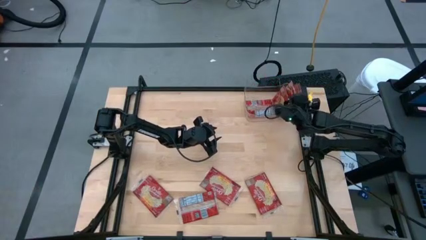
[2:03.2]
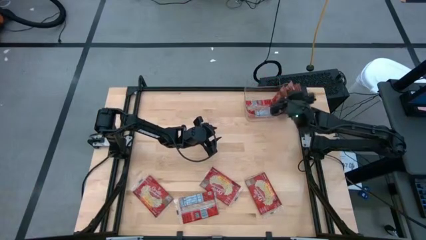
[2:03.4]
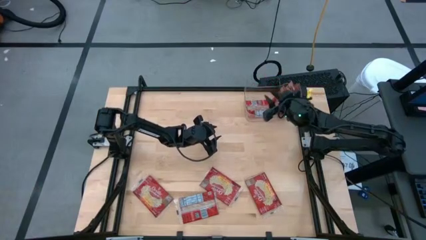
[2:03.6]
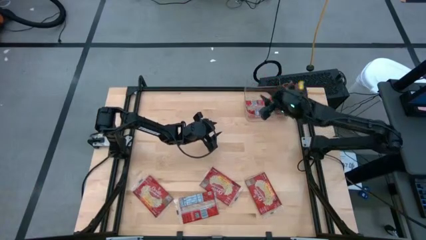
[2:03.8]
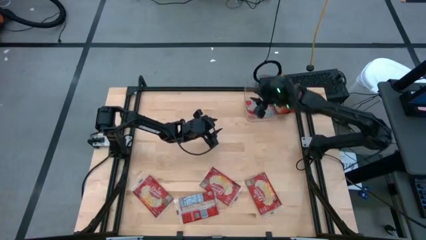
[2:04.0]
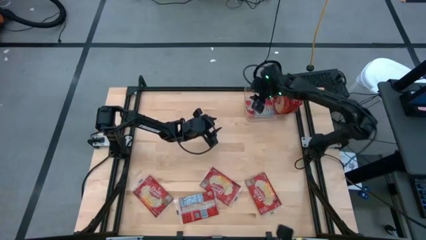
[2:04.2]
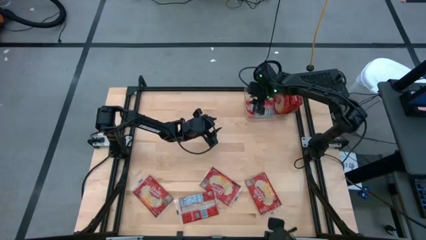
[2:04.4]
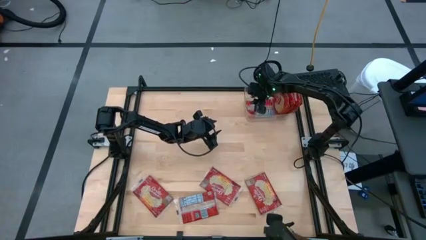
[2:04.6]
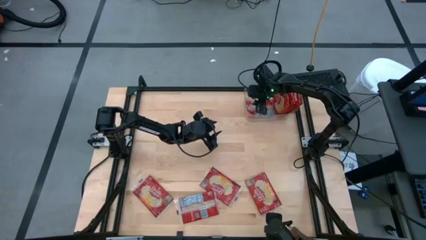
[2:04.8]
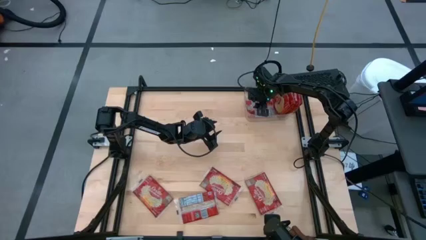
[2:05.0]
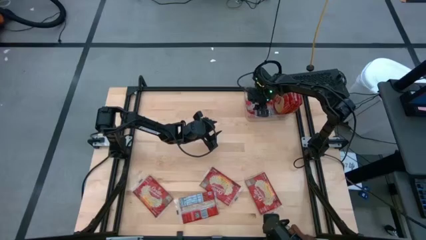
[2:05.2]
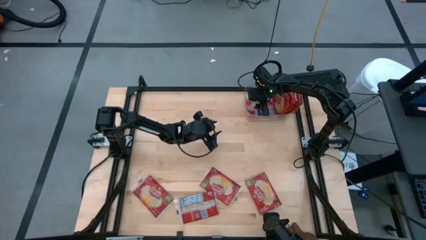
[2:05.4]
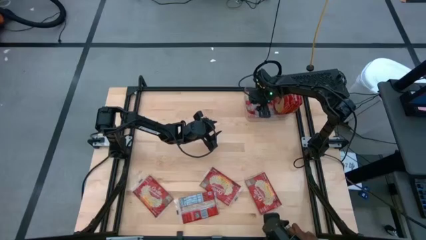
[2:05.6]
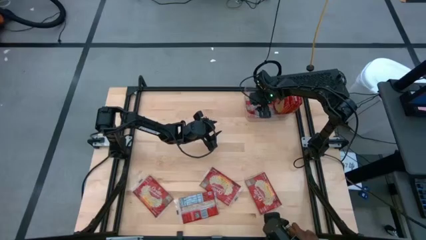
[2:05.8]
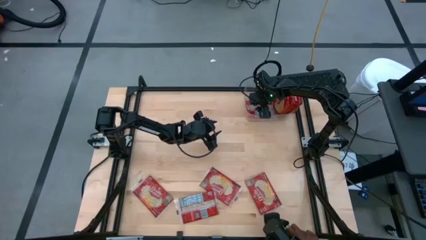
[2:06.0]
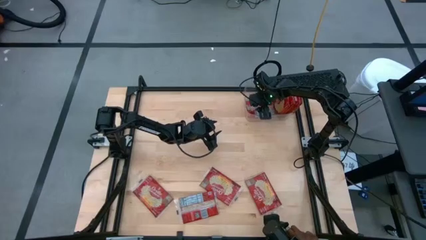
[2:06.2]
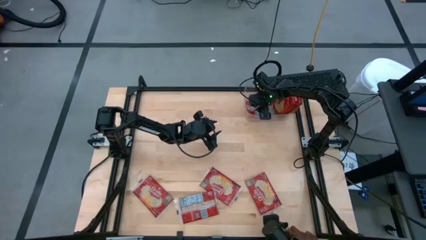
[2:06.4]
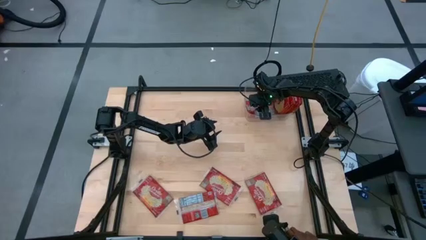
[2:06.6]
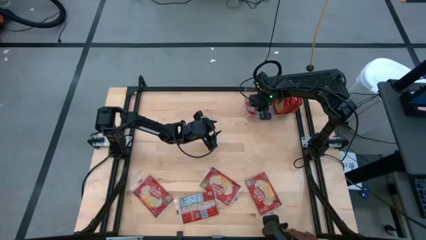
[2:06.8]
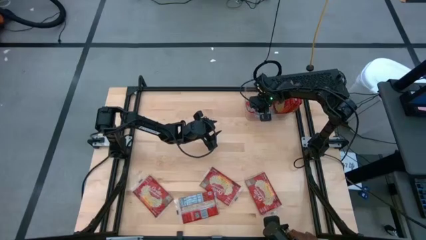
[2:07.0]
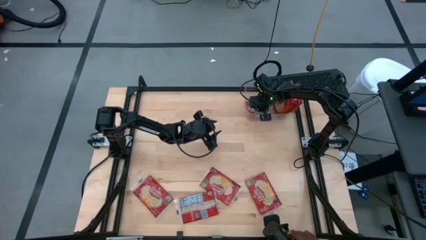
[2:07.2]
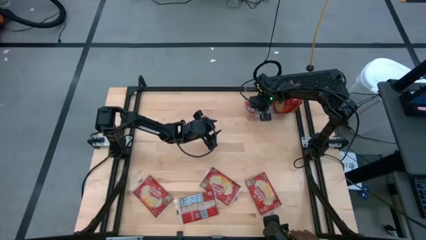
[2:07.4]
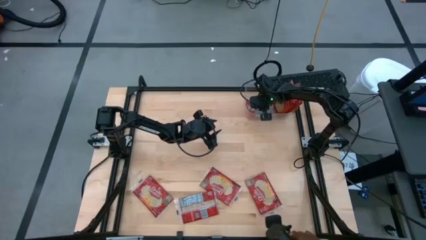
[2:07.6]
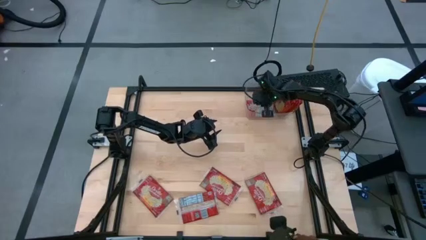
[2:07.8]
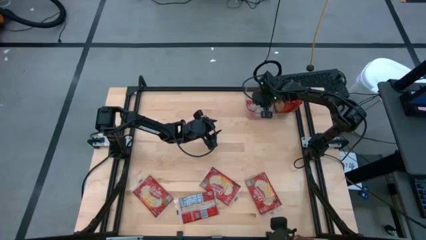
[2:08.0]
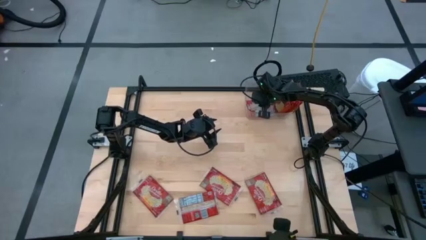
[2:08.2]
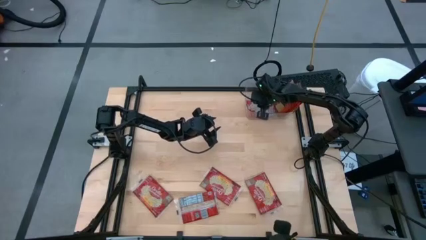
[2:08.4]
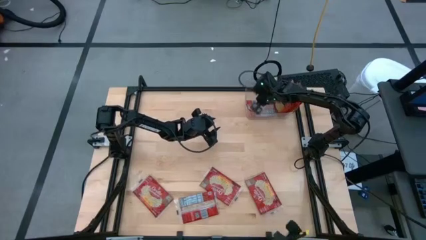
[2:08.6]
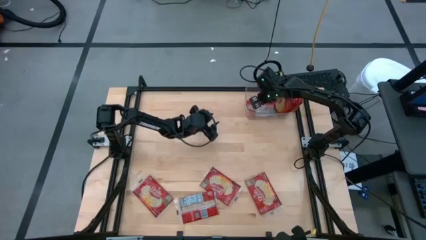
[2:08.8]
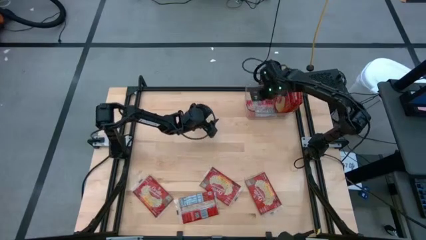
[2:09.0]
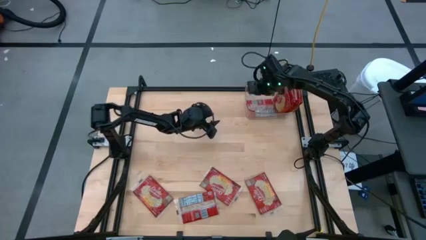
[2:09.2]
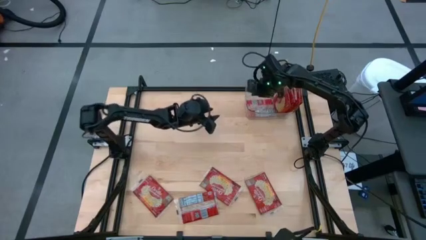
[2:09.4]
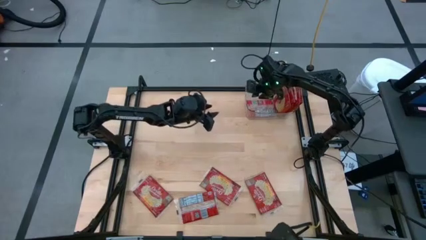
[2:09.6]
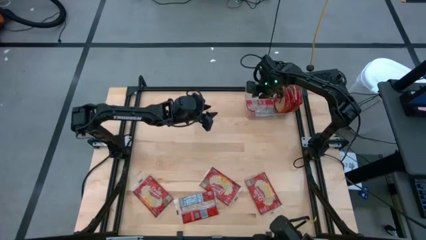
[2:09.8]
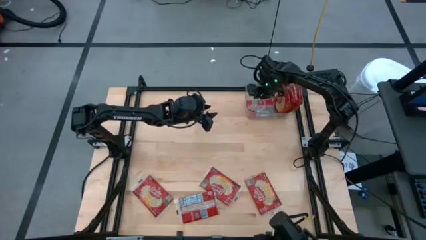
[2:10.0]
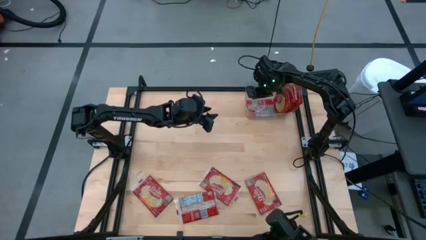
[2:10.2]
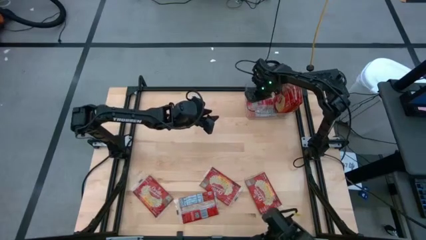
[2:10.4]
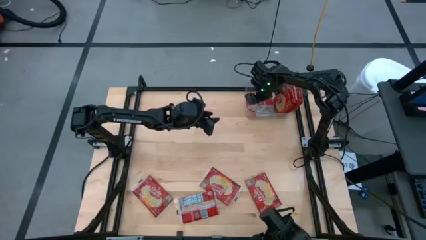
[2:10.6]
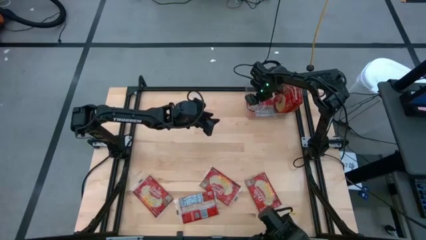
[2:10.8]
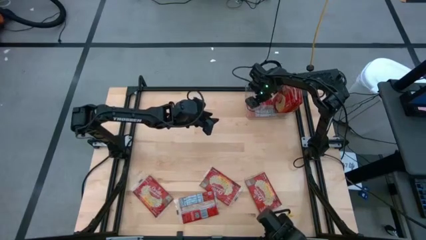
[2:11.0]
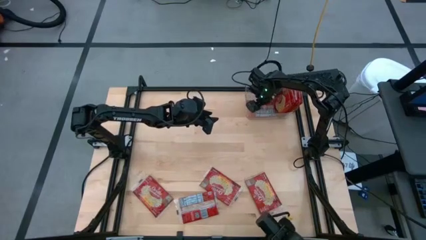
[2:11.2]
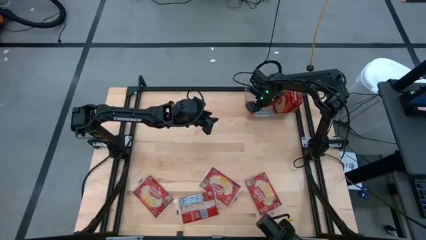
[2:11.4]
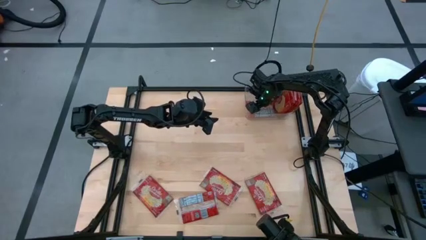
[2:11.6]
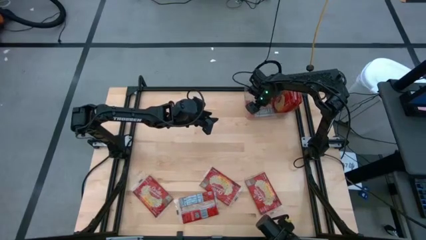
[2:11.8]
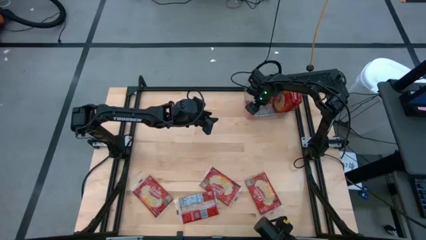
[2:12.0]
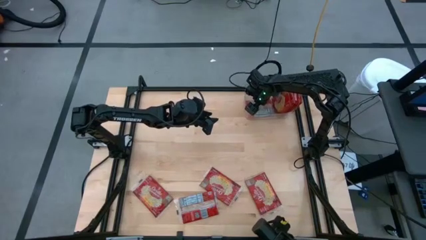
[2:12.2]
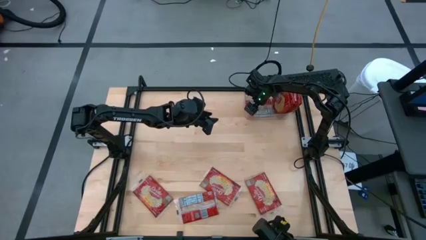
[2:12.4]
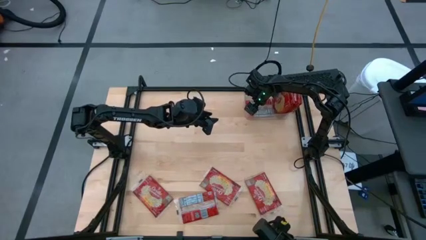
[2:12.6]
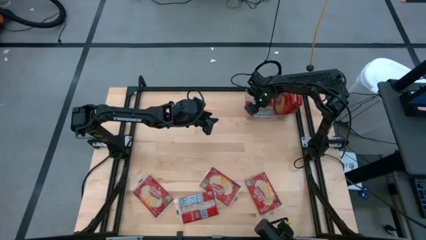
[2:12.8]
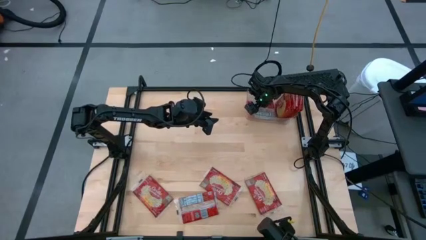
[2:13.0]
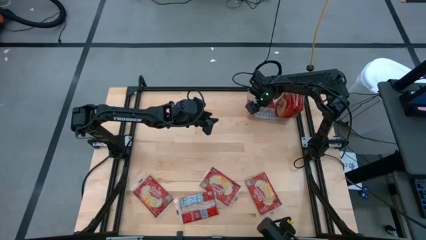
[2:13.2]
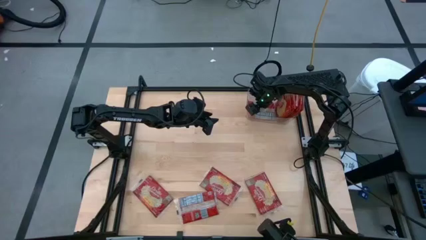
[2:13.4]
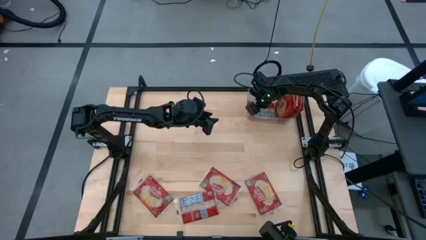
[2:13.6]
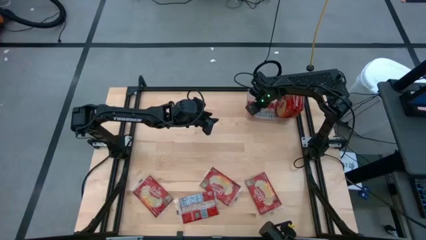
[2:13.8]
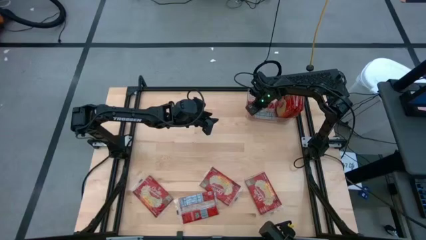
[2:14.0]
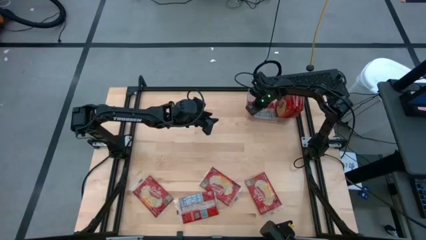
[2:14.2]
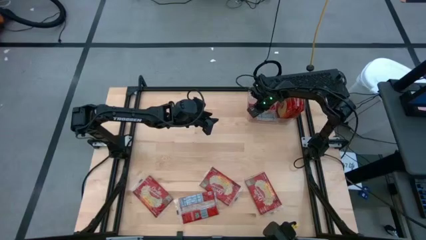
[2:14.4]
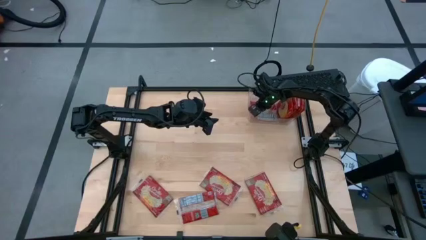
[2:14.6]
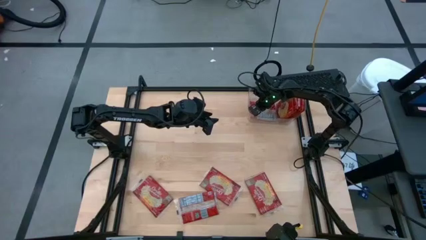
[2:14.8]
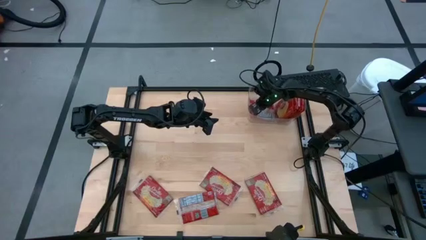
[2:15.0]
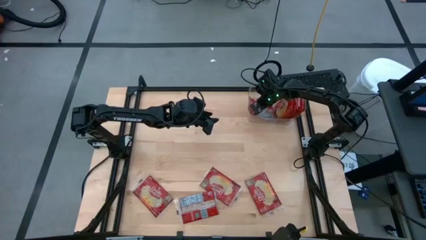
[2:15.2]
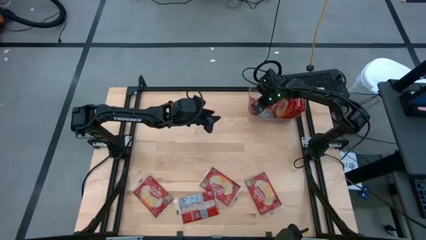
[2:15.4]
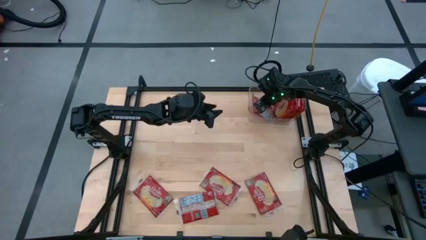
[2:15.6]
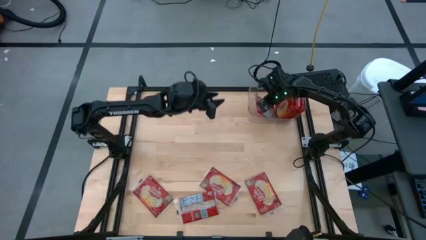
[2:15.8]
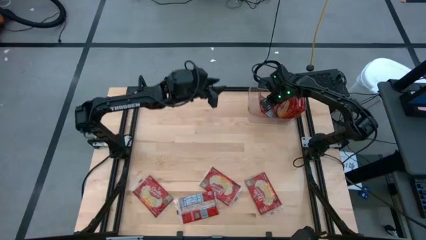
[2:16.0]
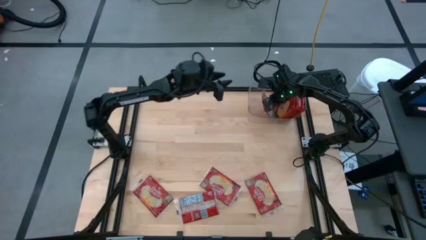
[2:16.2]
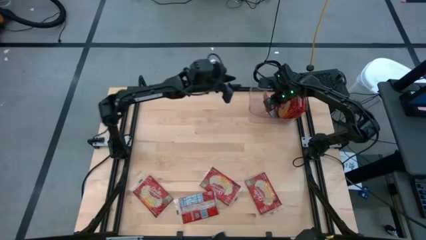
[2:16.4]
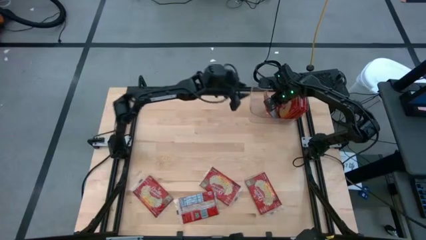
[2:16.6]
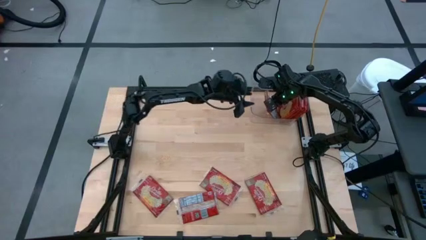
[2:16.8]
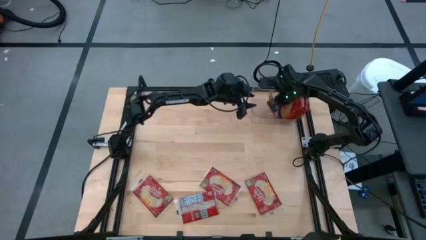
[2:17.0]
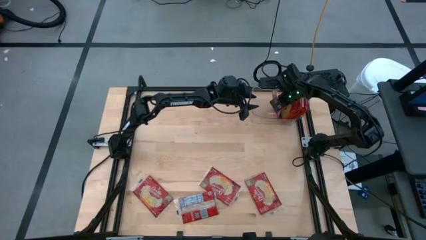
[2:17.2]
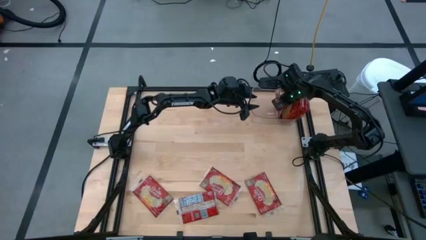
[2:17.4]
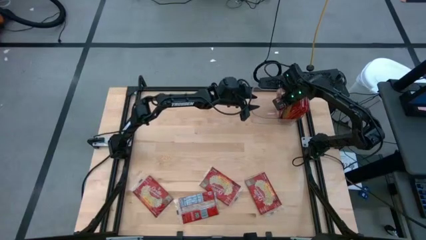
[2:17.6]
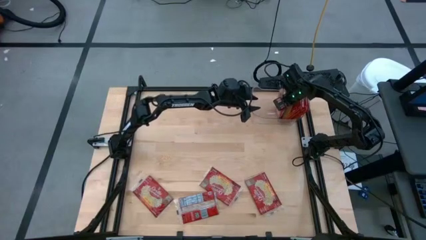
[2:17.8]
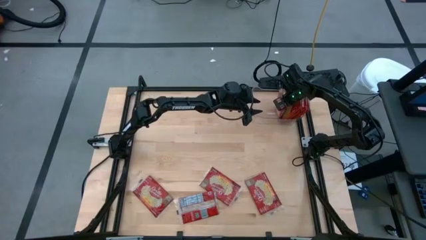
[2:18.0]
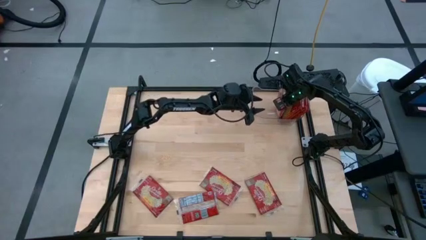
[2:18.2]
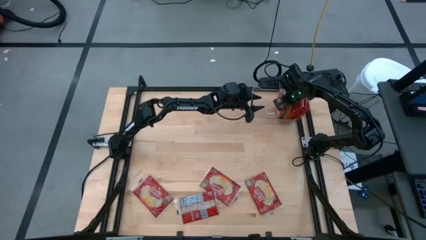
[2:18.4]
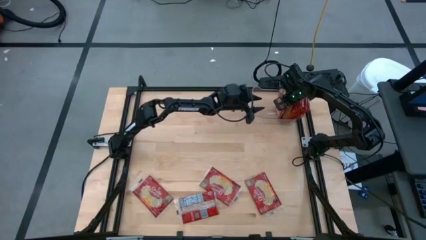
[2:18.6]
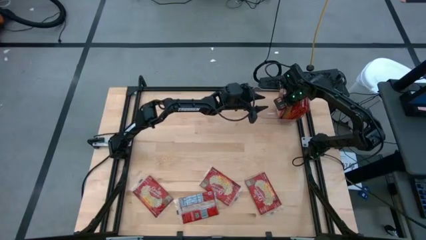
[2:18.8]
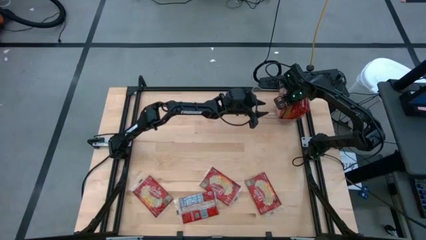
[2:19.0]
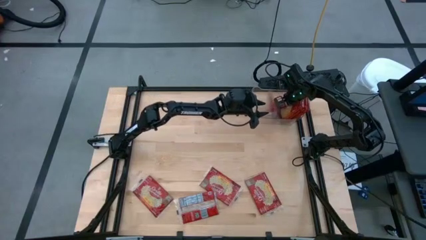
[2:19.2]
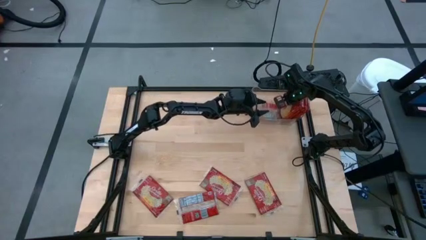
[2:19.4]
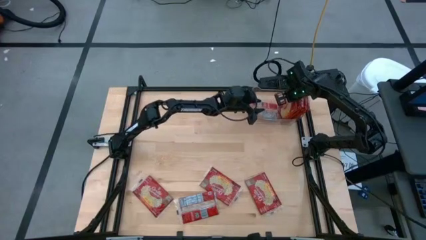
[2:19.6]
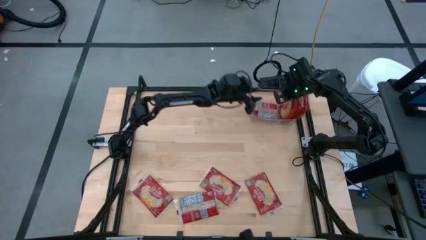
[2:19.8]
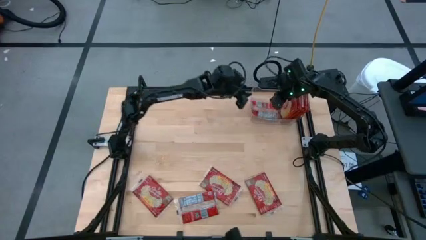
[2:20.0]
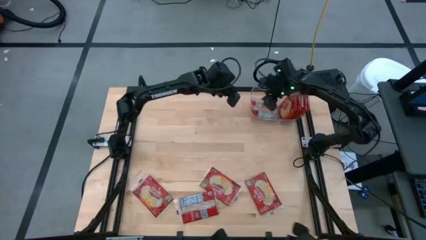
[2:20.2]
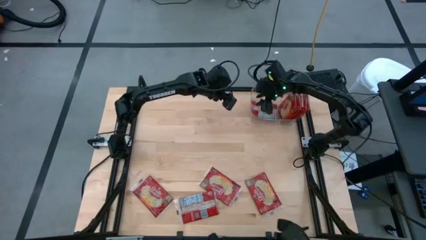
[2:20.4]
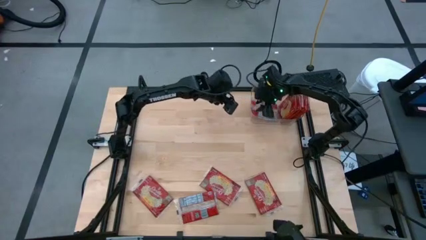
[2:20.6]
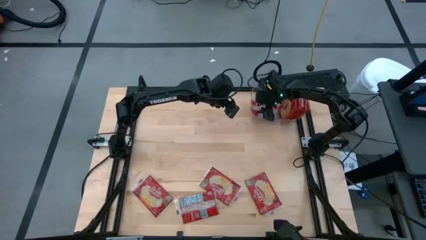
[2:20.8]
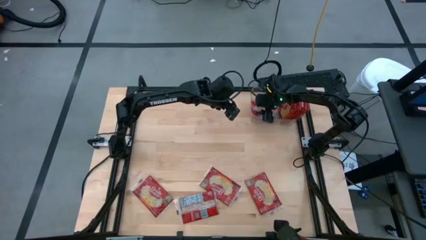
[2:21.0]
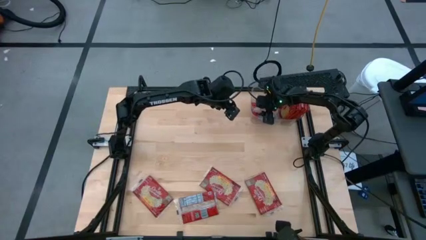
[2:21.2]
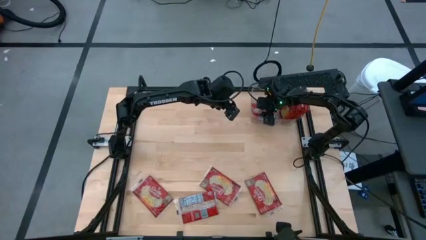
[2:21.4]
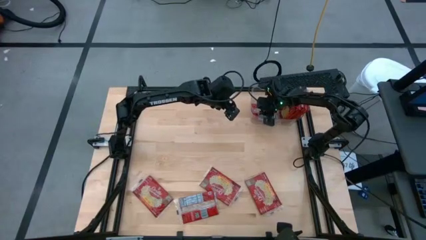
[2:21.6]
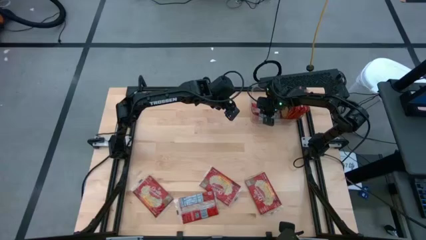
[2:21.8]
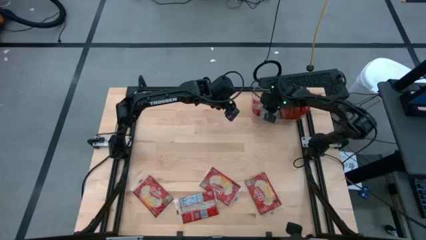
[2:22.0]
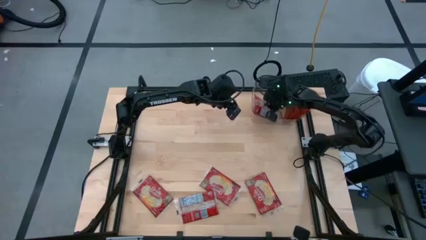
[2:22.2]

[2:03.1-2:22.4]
Task: Sort popcorn bags into baskets
Adjust the red popcorn bag in the transparent bin
